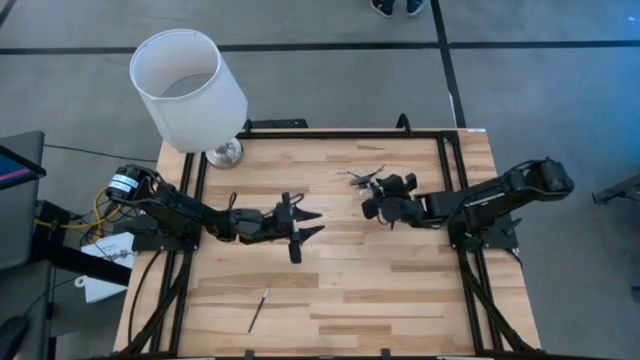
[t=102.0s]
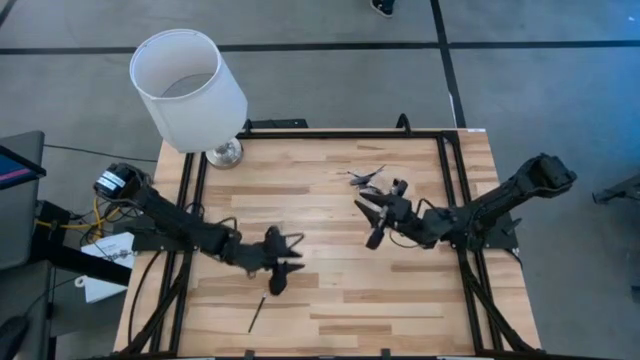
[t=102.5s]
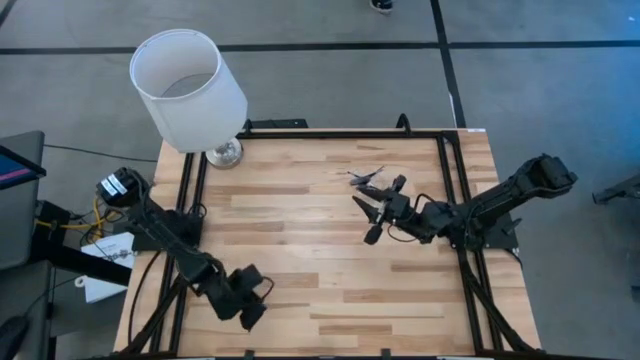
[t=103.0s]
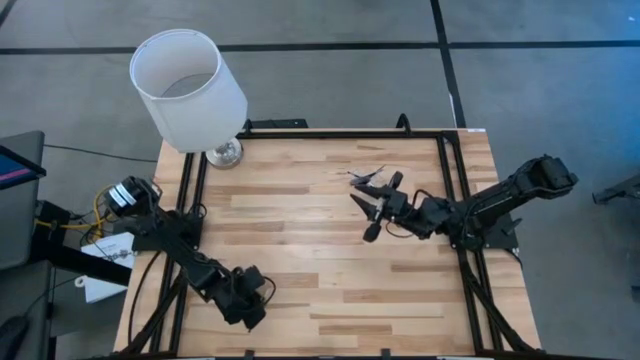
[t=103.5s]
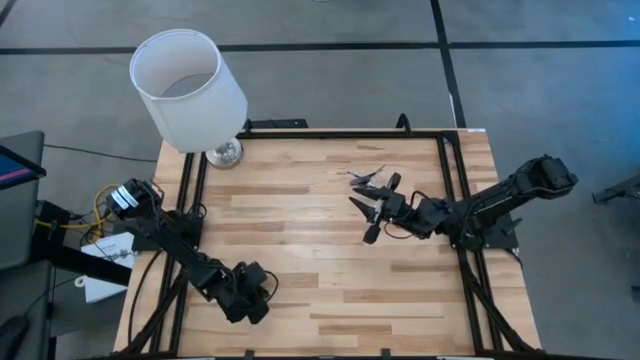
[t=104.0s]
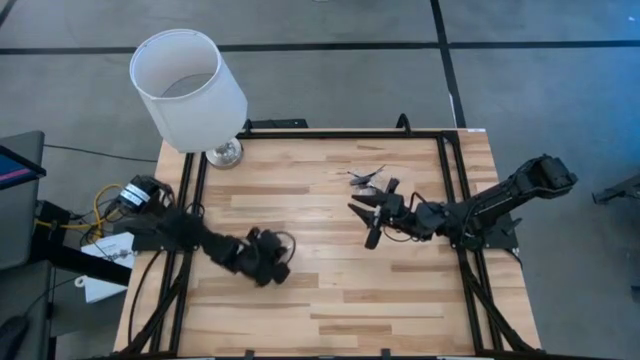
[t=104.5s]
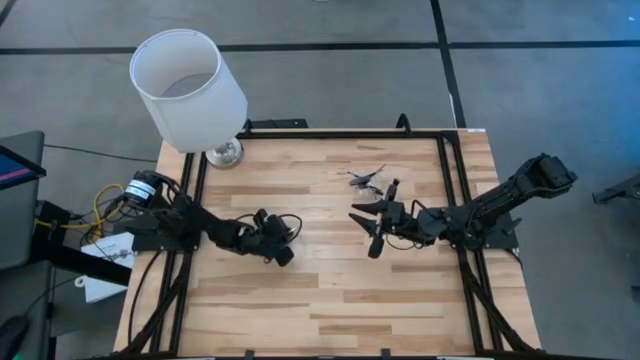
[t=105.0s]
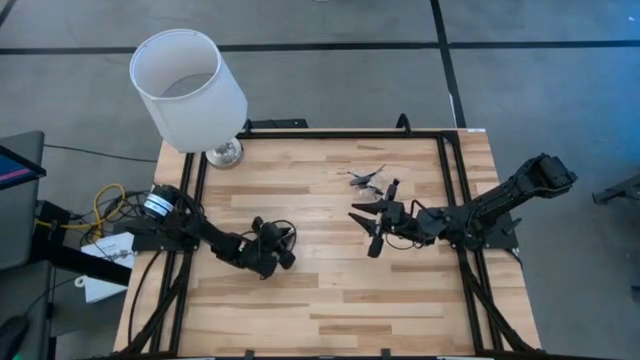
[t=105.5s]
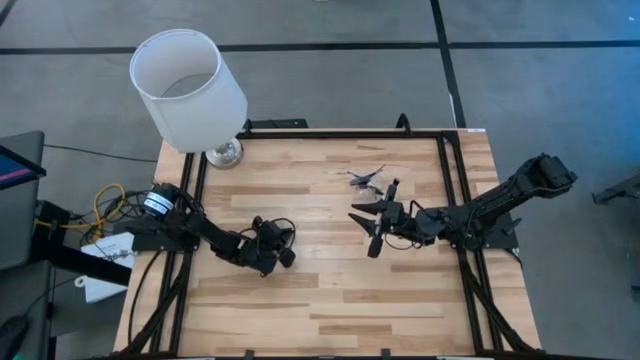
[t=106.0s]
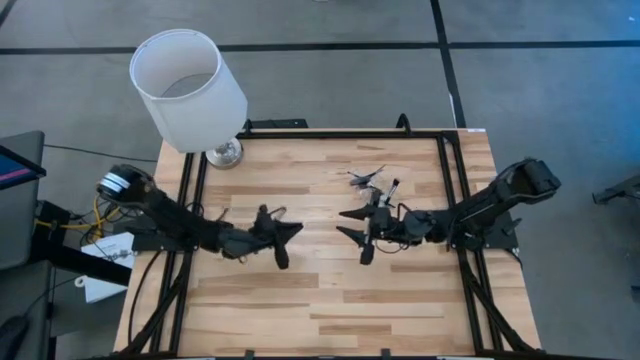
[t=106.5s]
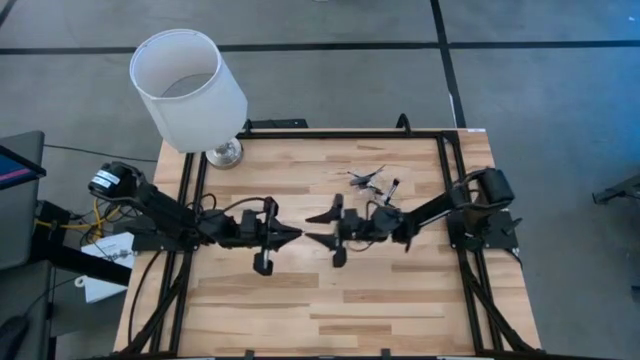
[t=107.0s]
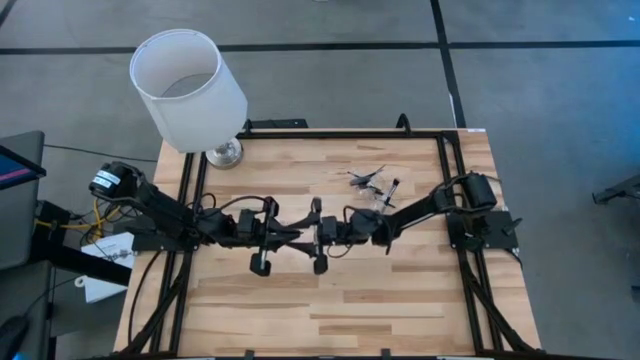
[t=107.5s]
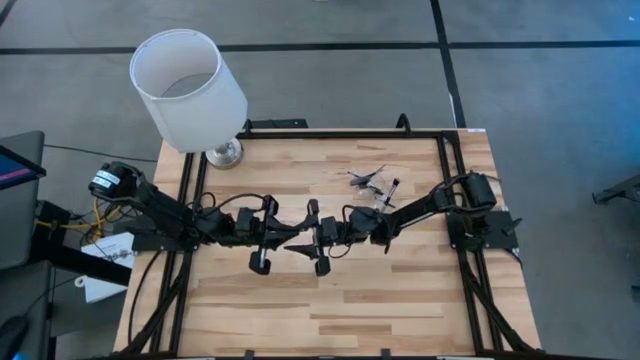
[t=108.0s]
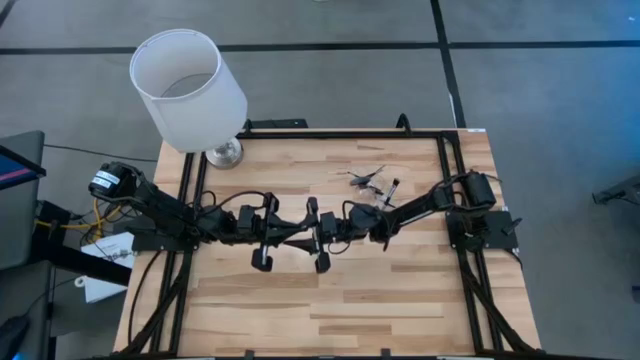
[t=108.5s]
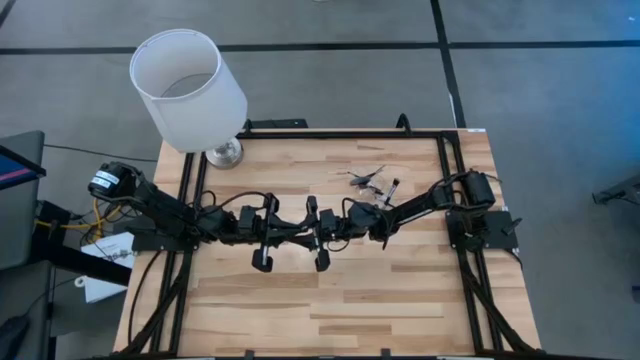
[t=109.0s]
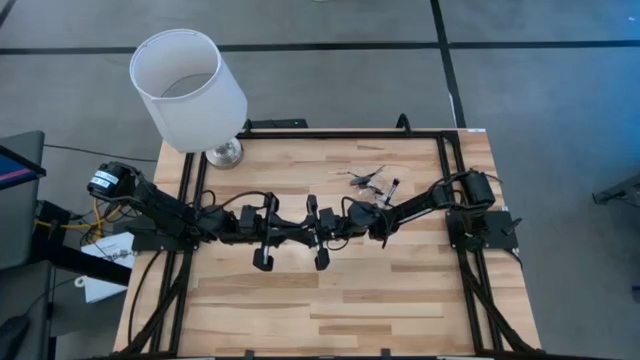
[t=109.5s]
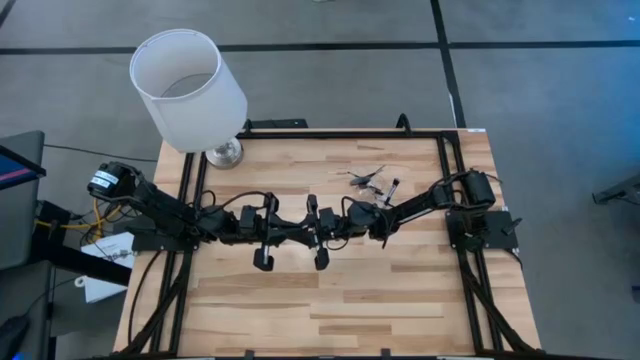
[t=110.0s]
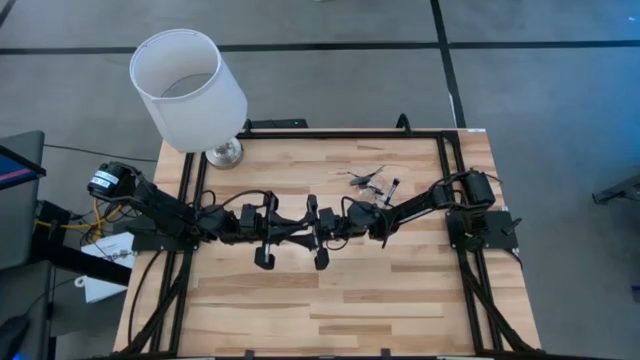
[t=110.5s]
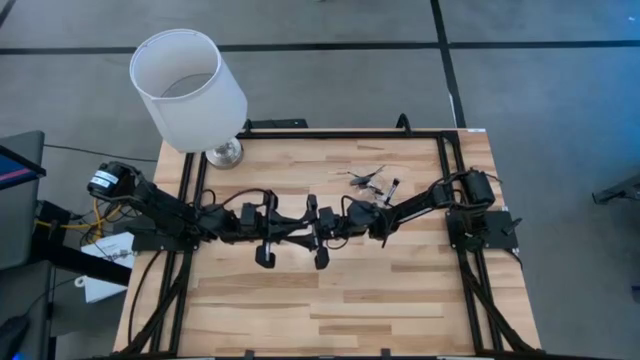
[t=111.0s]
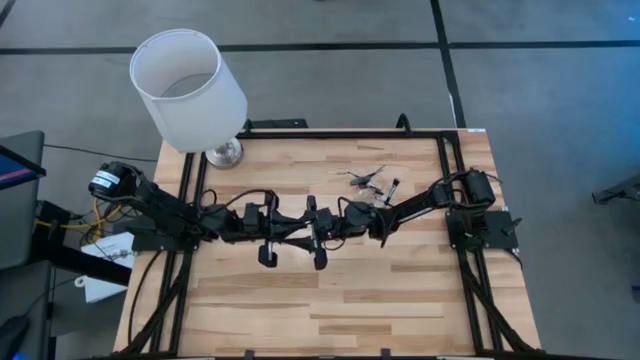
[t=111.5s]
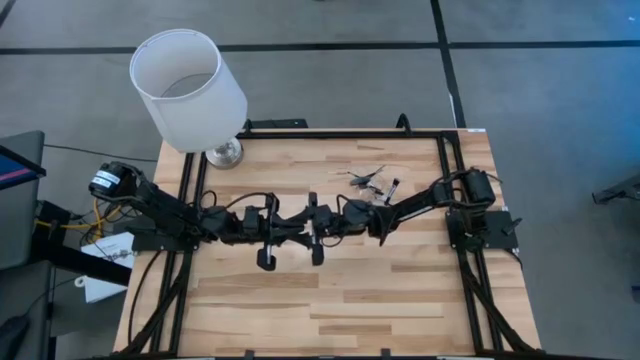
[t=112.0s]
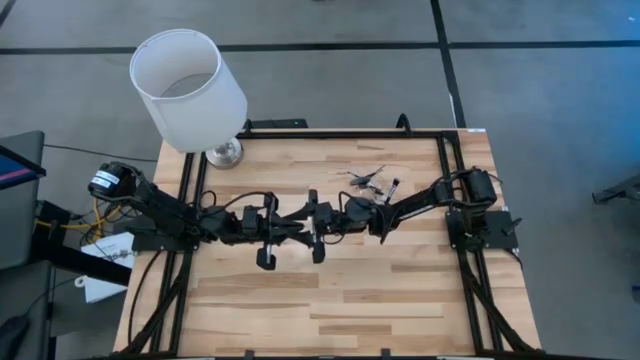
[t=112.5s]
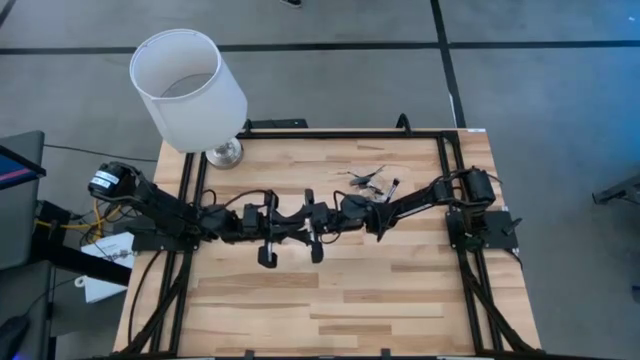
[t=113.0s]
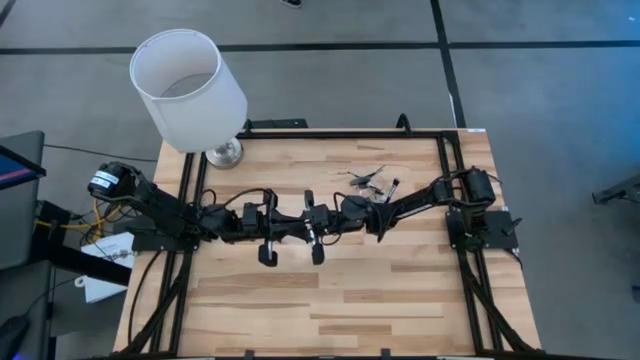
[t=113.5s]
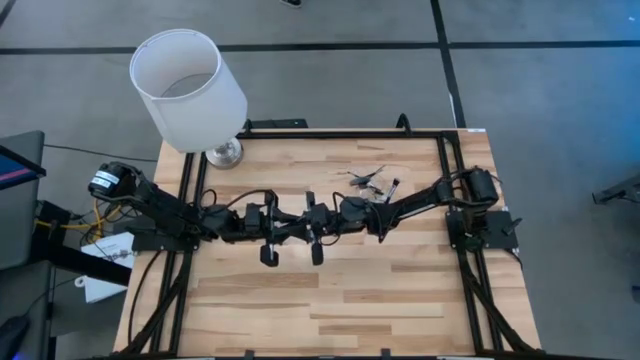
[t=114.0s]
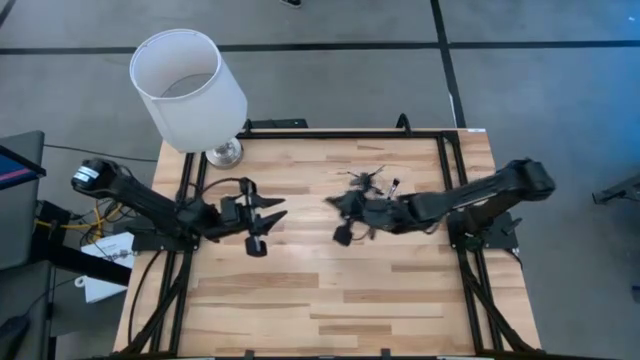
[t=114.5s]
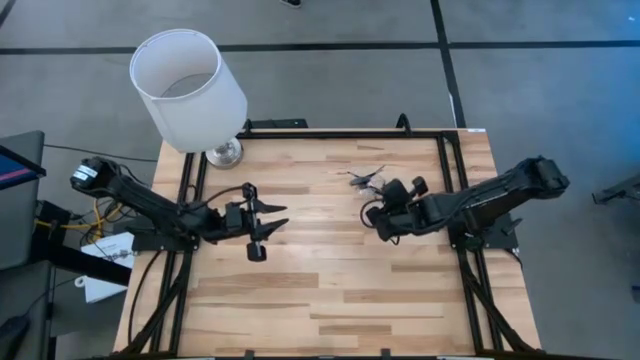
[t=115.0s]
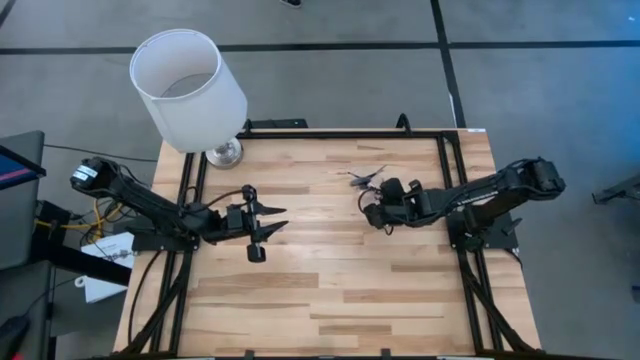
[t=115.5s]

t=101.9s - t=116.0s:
Task: Put items in baskets/containers
Put the liner brush into the transparent organizer

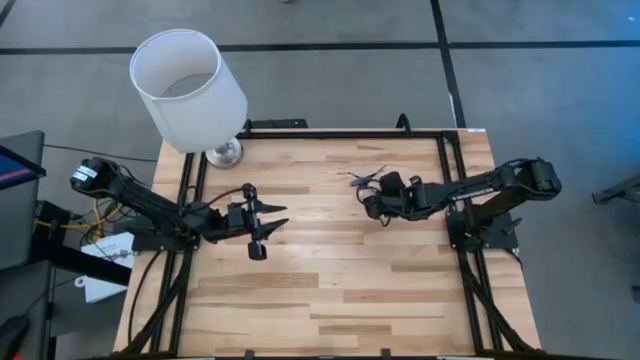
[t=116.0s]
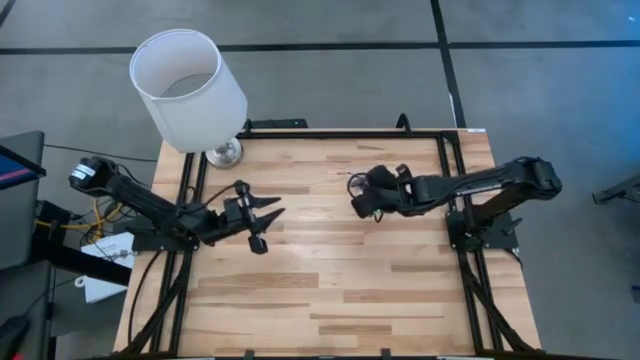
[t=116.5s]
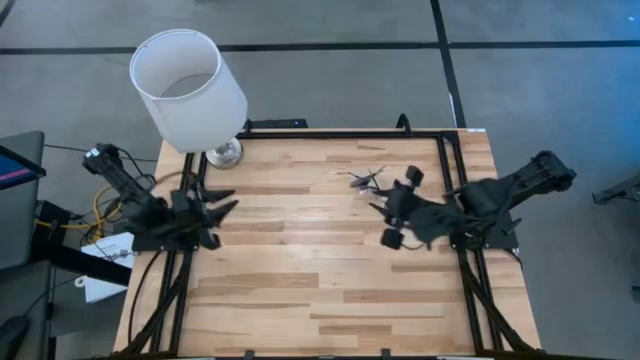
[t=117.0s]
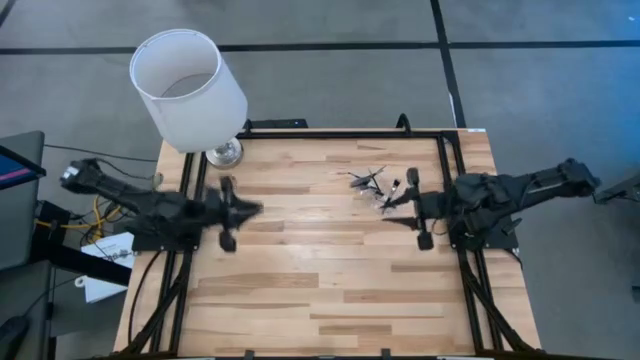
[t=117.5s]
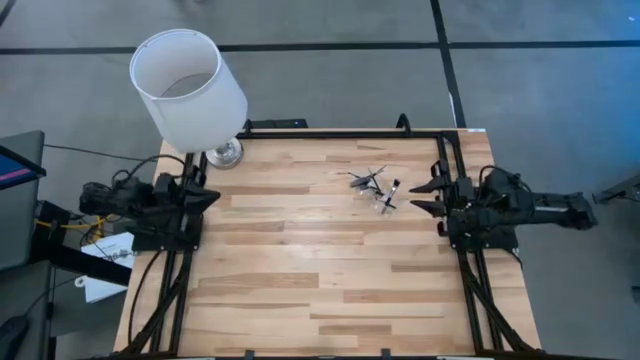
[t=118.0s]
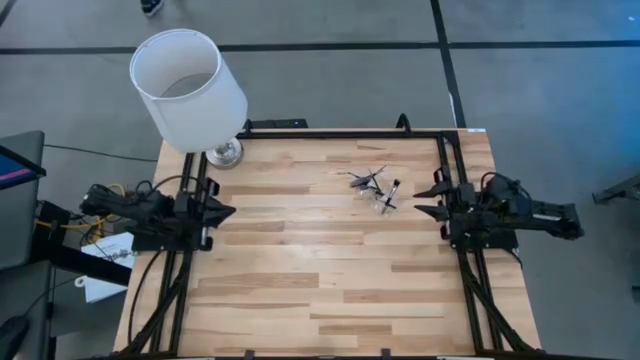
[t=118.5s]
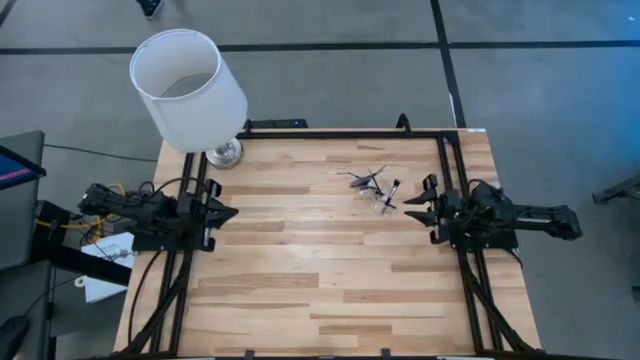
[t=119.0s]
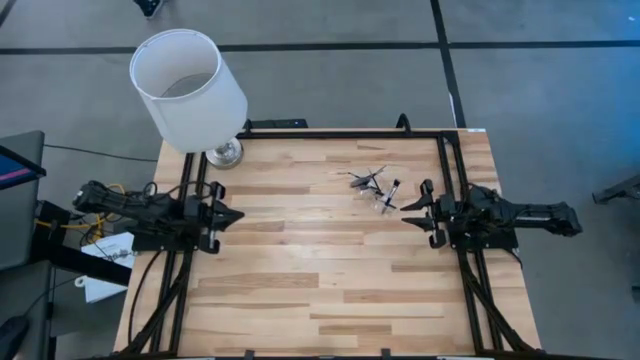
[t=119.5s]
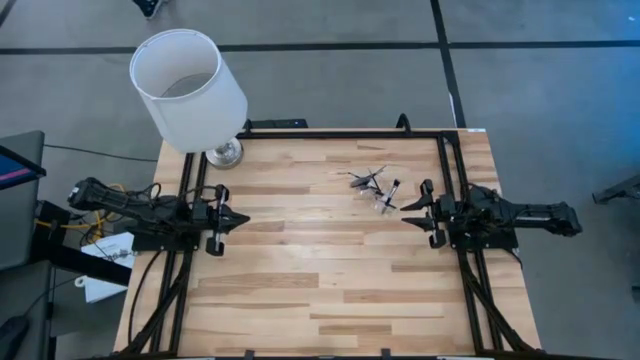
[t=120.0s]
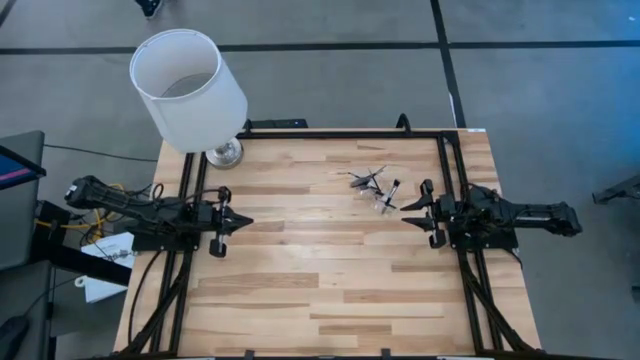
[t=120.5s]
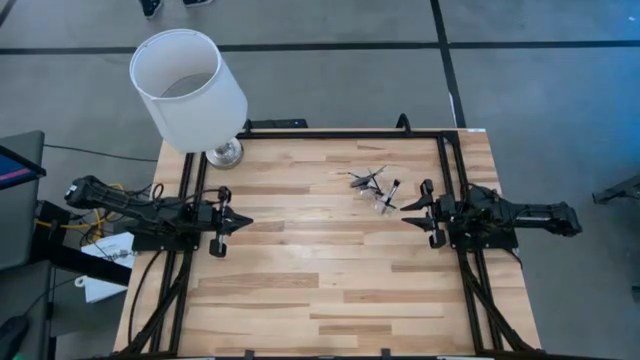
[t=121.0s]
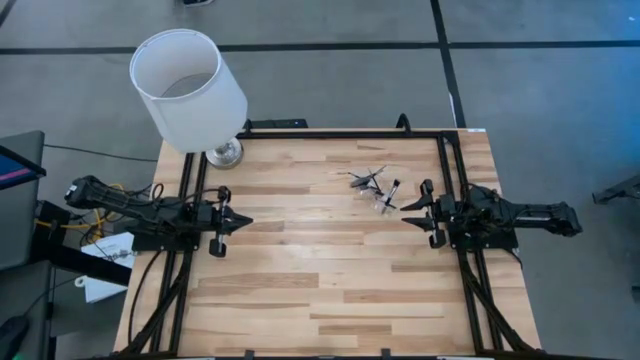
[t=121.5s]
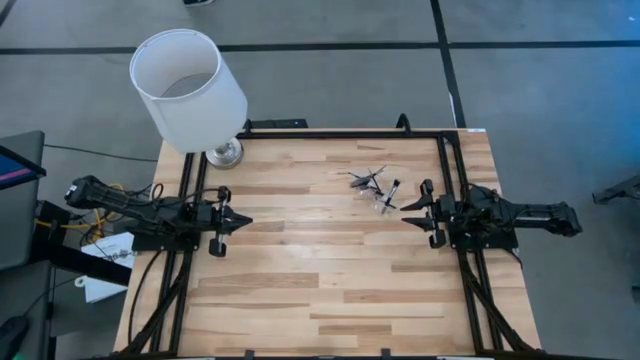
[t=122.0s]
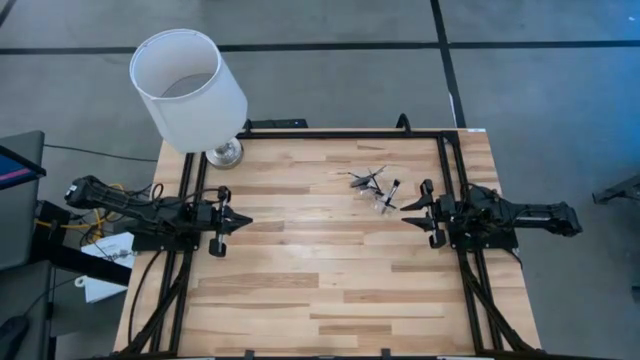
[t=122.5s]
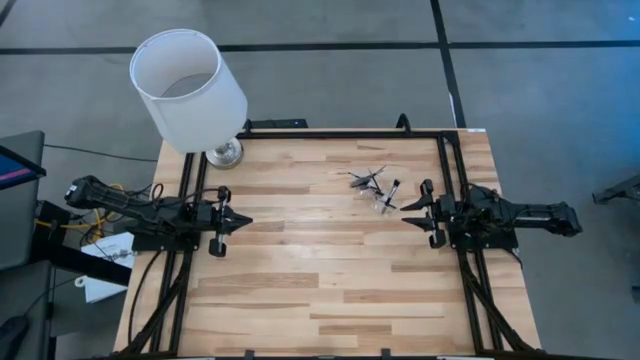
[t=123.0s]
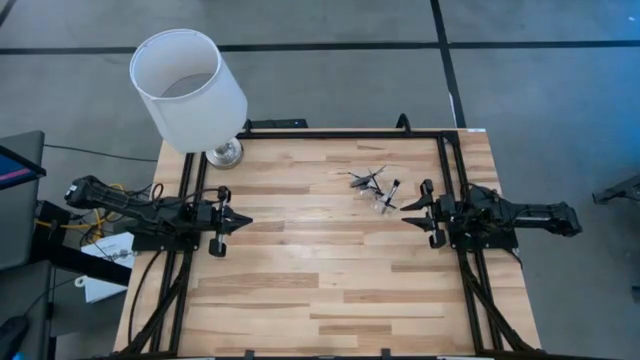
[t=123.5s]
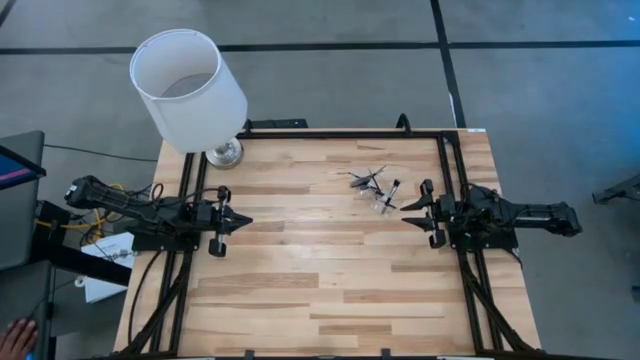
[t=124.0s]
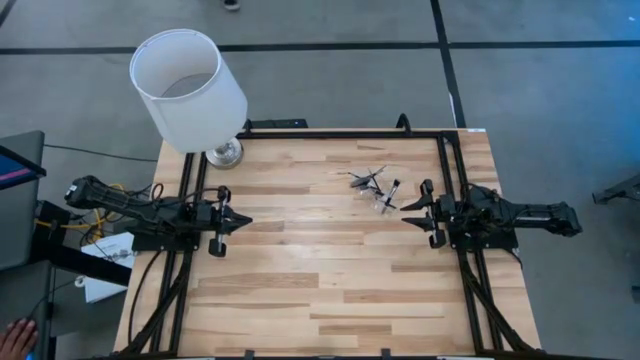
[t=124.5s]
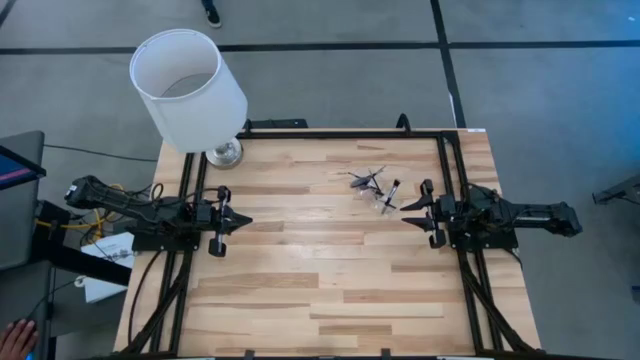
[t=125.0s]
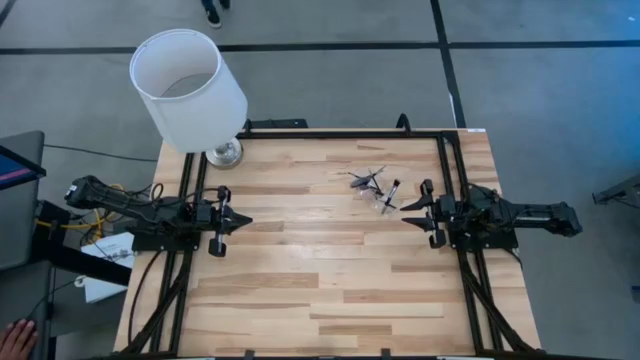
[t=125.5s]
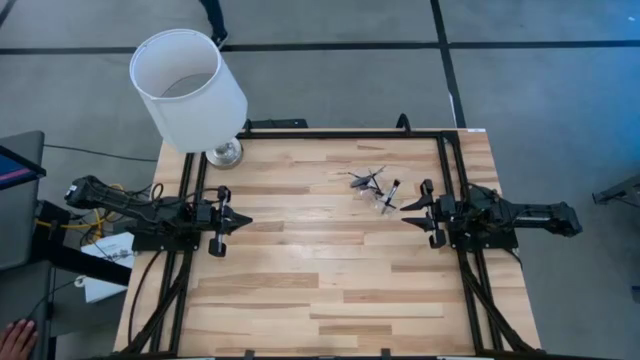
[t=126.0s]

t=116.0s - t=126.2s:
Return to Home Position
